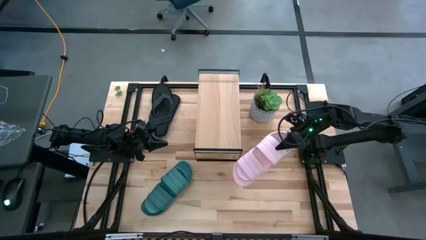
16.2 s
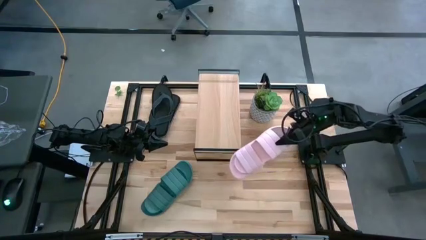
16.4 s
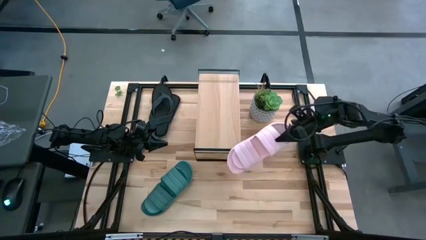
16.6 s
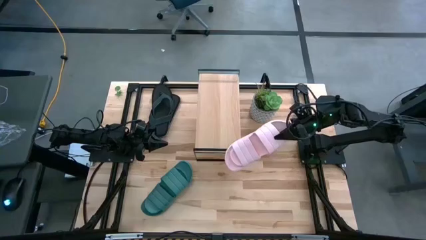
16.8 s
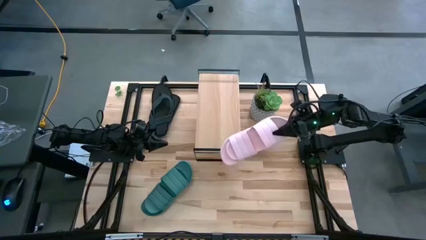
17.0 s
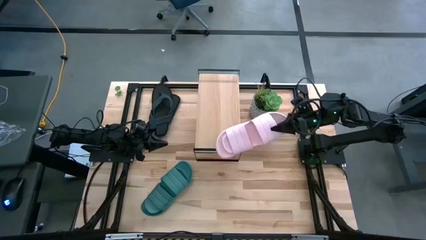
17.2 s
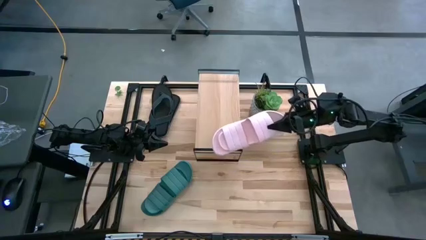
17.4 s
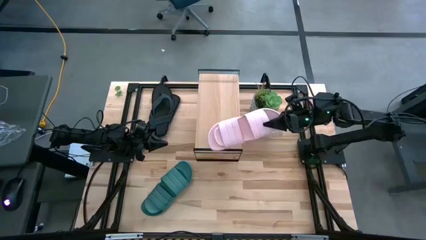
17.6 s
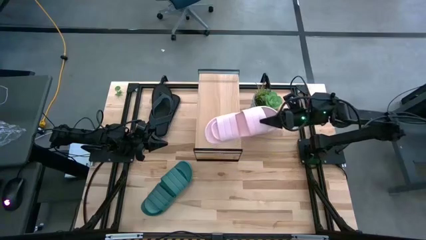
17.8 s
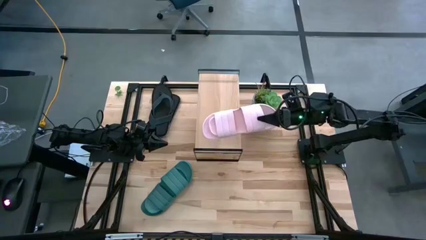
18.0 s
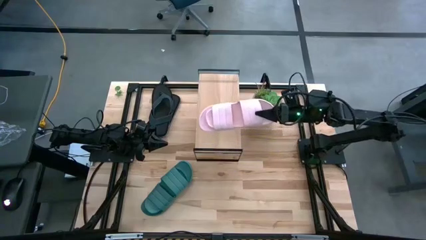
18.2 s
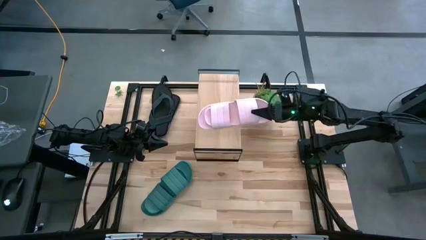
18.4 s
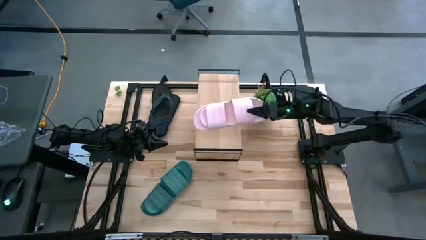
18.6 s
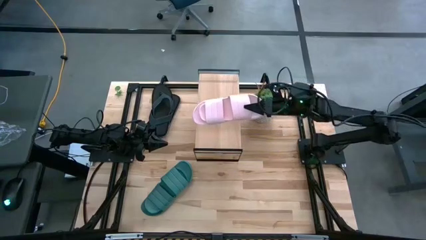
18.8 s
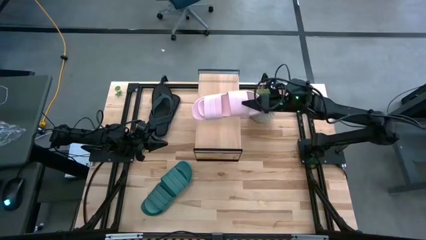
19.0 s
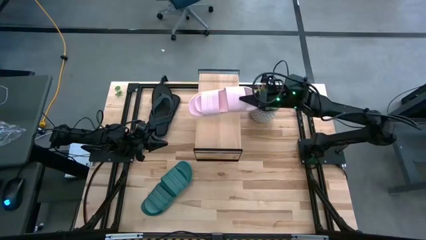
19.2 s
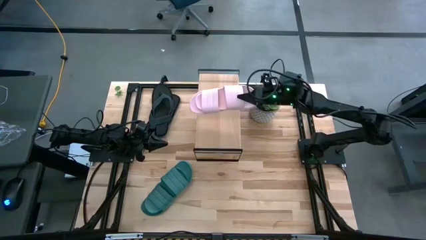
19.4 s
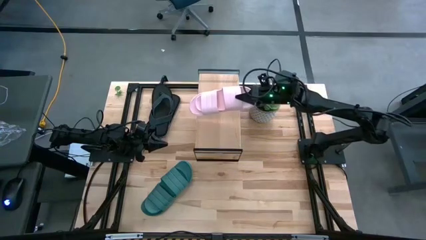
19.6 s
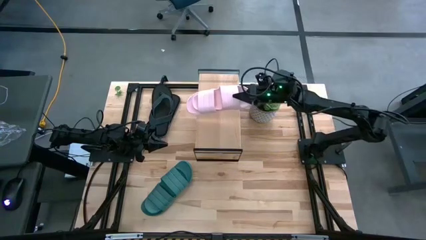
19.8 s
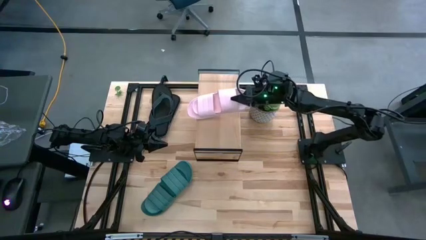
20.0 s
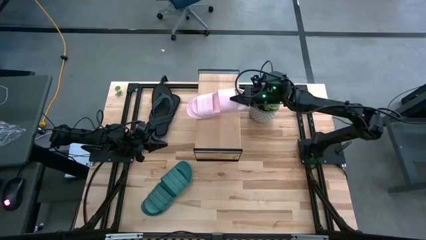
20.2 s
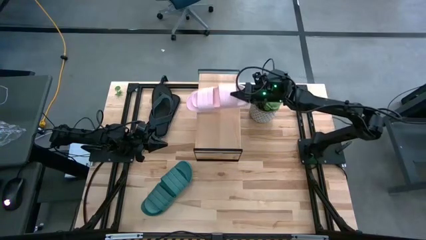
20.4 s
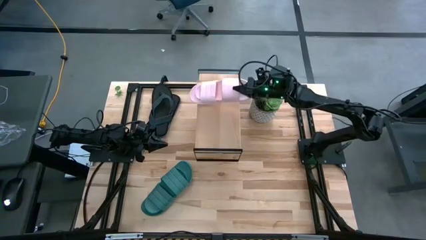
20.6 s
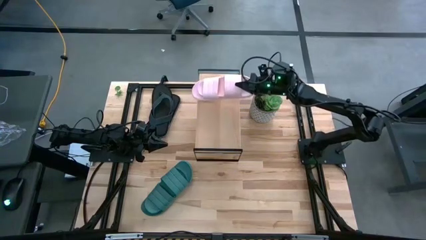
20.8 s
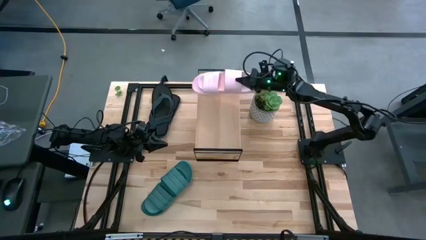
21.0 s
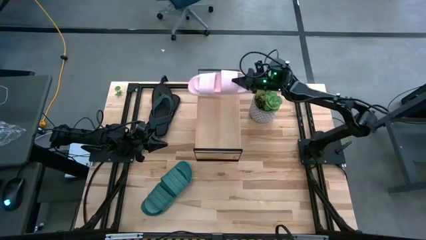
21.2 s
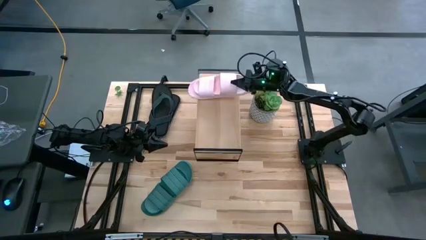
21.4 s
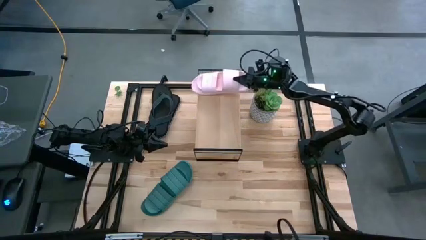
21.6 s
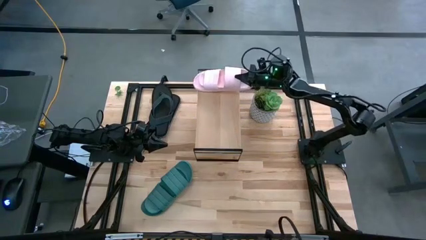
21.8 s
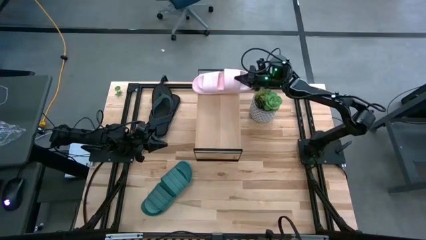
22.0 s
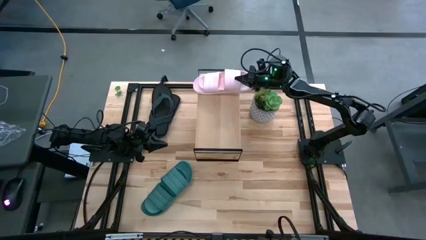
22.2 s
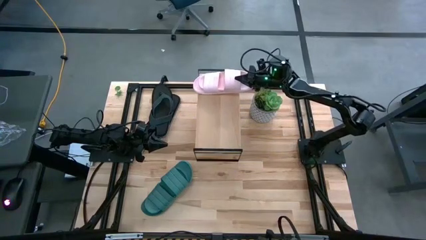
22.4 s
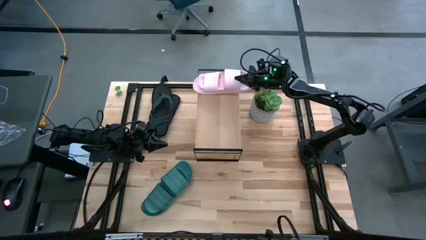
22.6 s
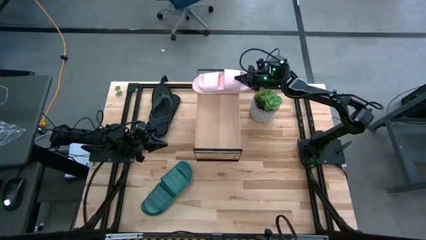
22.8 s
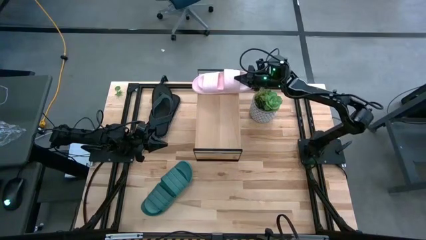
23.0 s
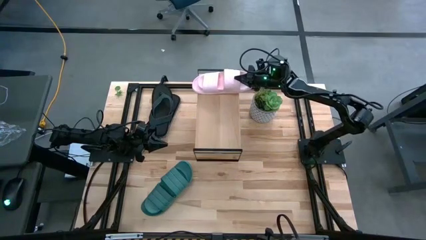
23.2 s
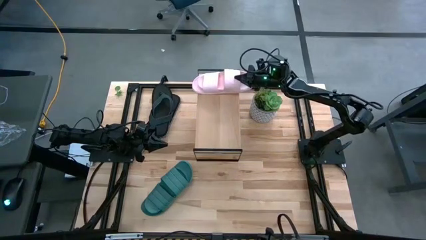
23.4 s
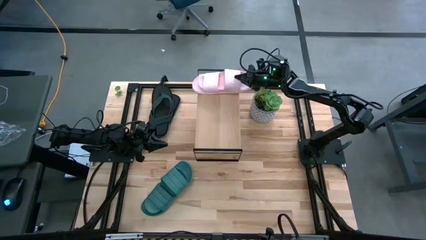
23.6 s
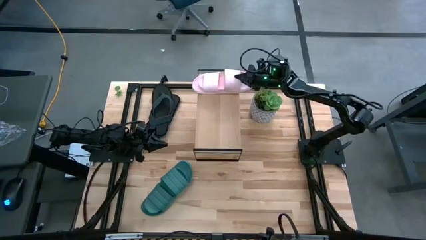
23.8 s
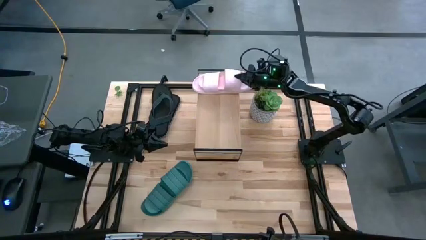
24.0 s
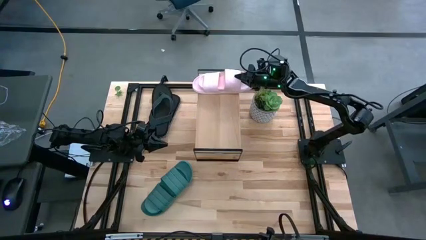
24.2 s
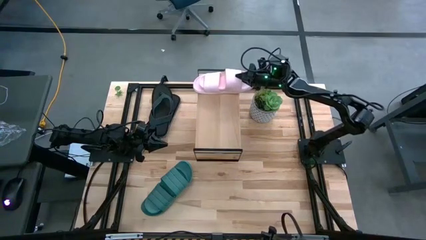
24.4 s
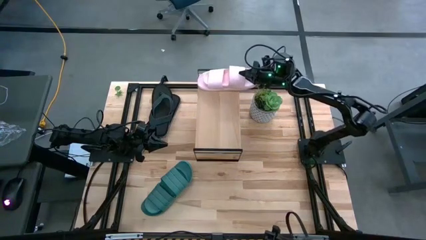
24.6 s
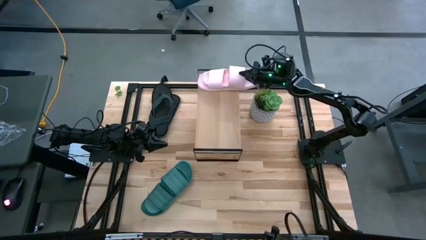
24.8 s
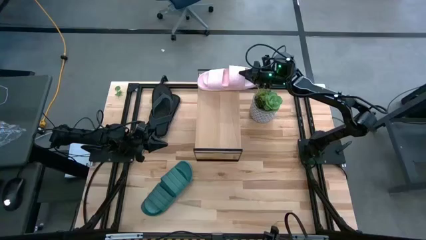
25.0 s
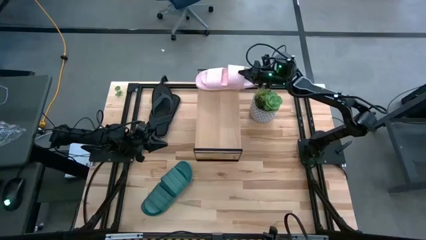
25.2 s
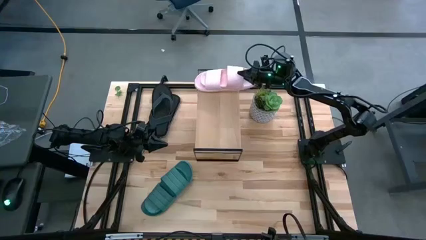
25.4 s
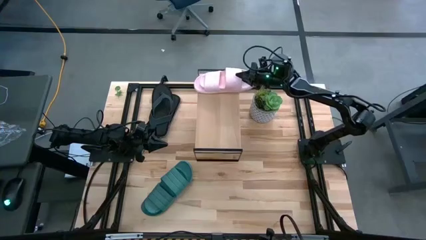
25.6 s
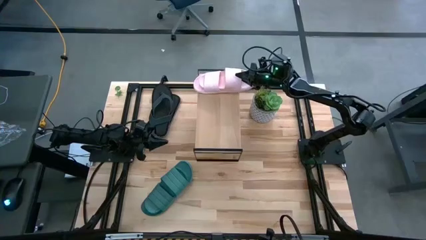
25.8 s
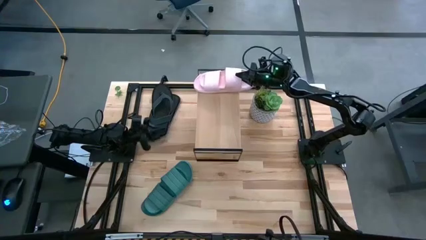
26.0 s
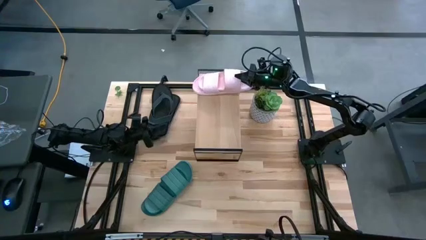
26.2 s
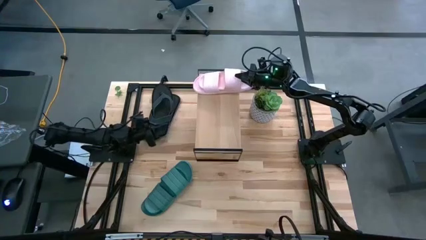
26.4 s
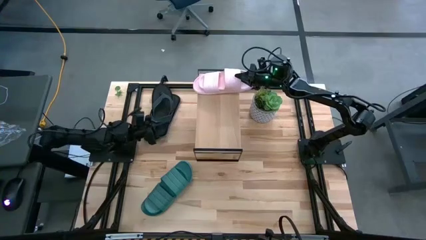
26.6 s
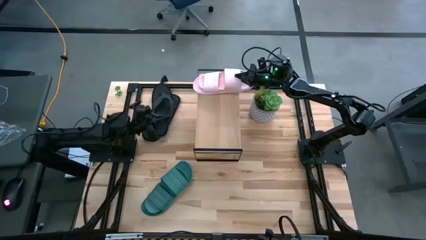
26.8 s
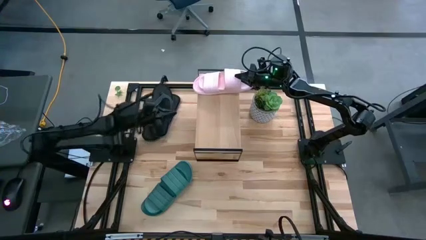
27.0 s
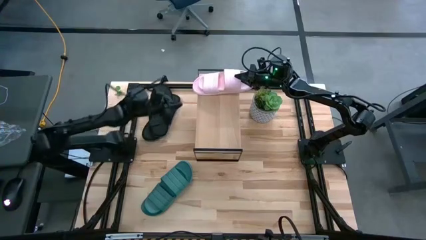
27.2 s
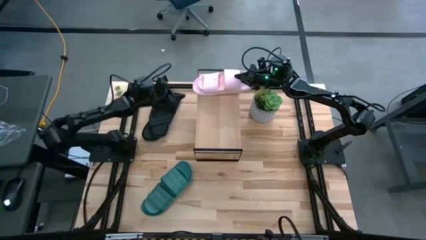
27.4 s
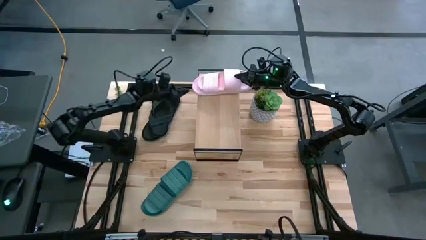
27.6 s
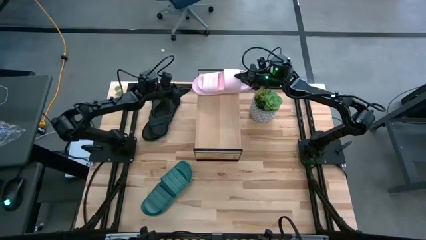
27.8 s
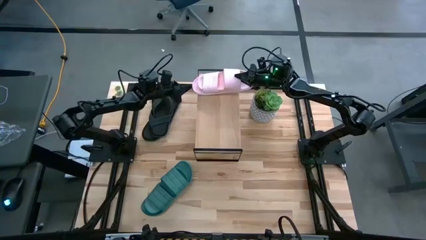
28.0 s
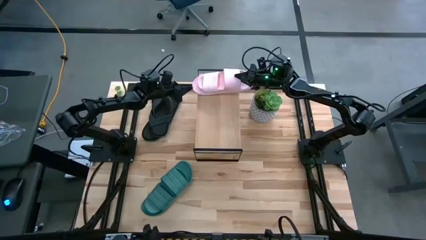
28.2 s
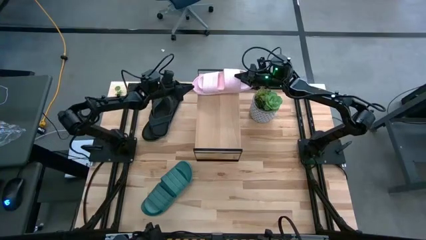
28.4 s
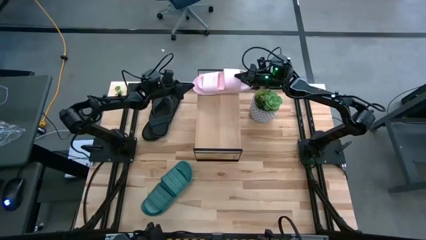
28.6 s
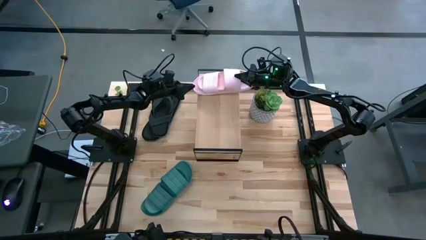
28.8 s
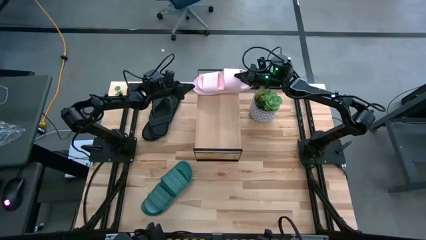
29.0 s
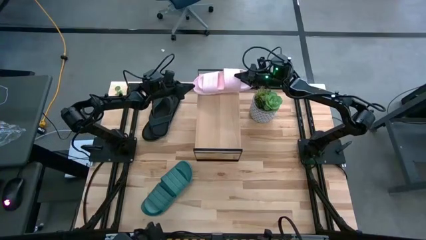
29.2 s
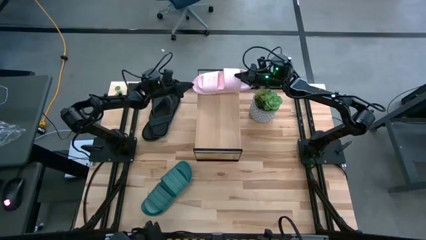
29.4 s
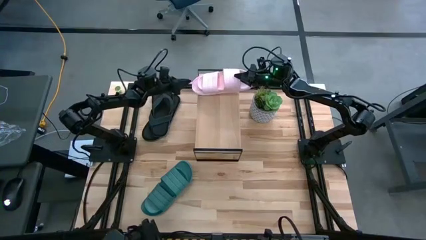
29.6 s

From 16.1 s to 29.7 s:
Task: Pick and place slippers onto the shelf
Put the pink pair of slippers on the shelf
